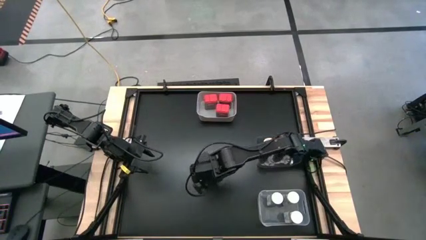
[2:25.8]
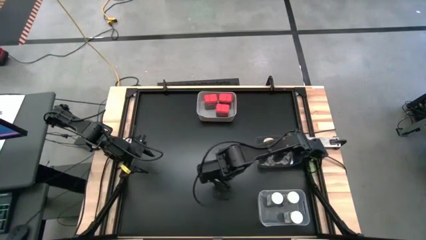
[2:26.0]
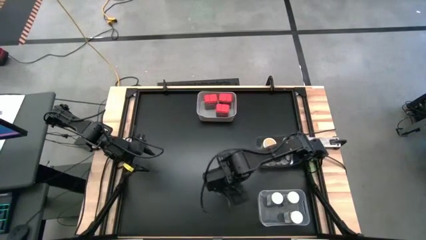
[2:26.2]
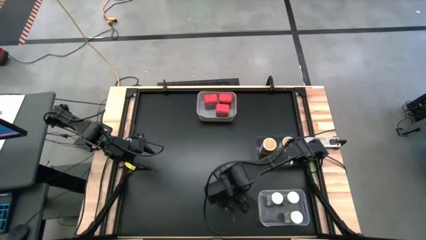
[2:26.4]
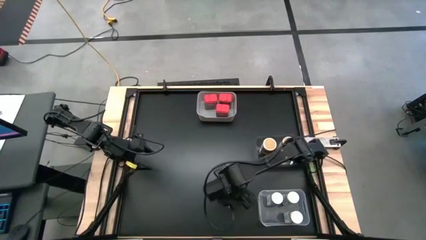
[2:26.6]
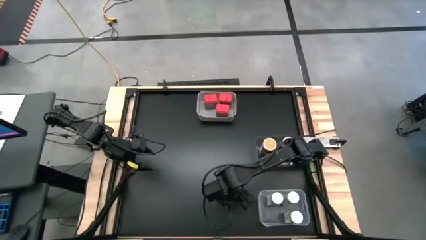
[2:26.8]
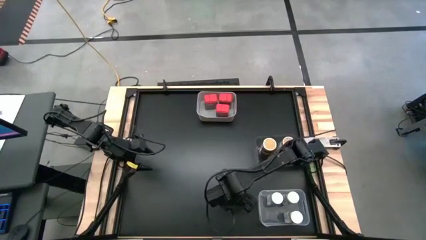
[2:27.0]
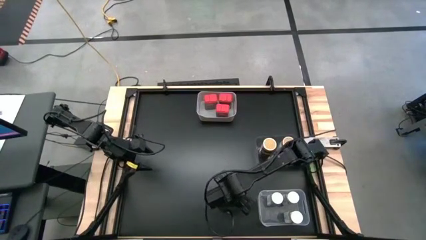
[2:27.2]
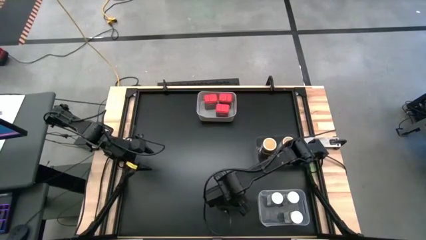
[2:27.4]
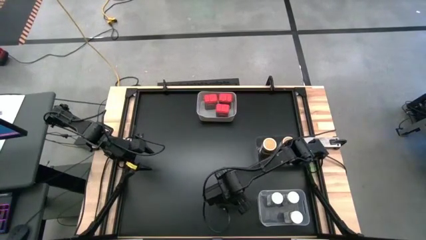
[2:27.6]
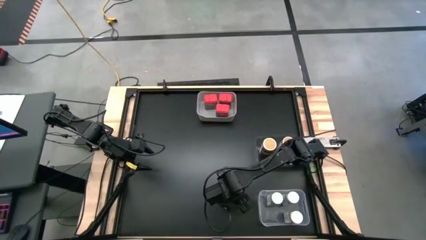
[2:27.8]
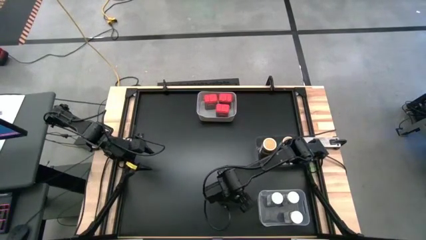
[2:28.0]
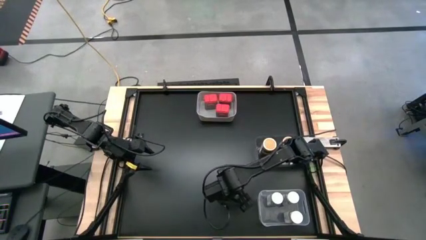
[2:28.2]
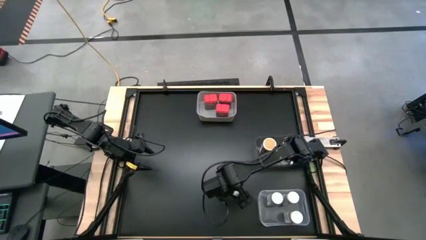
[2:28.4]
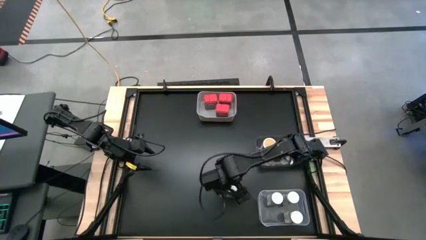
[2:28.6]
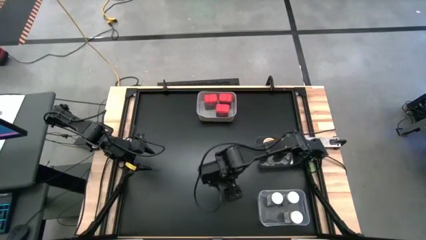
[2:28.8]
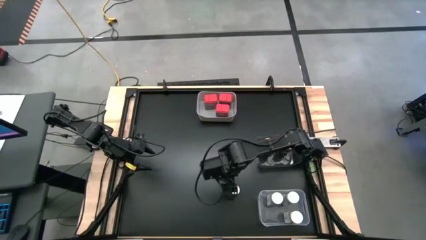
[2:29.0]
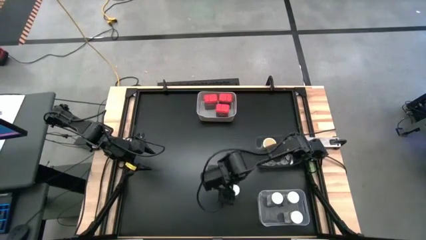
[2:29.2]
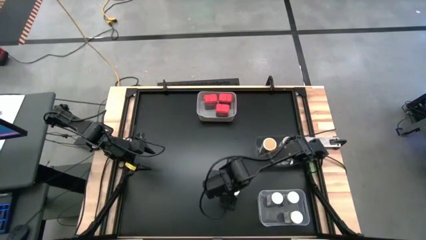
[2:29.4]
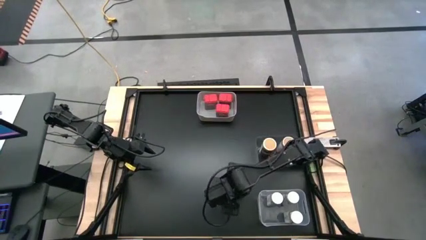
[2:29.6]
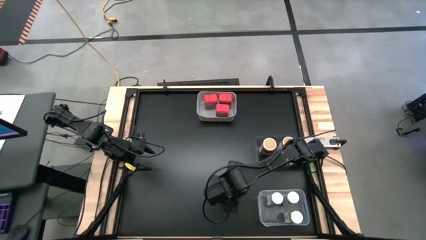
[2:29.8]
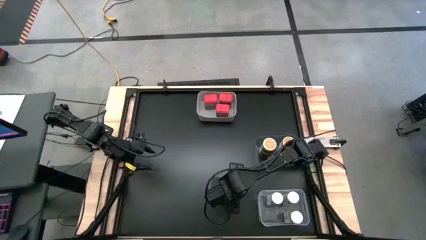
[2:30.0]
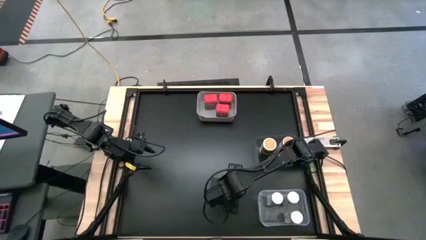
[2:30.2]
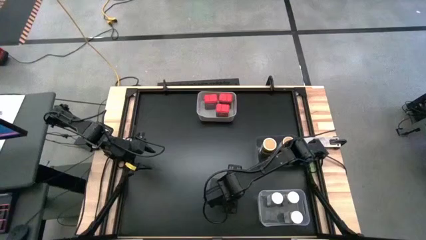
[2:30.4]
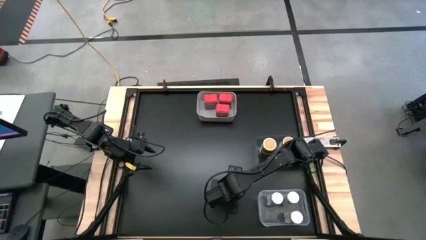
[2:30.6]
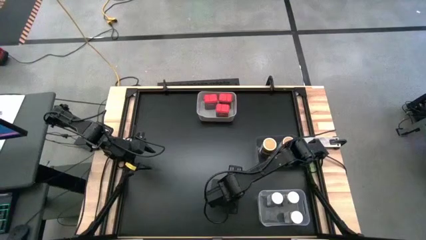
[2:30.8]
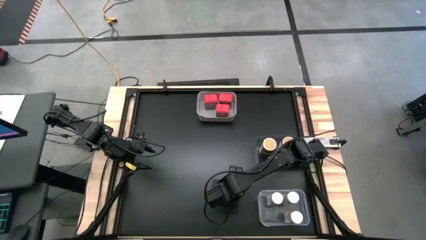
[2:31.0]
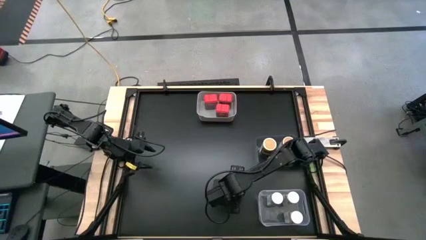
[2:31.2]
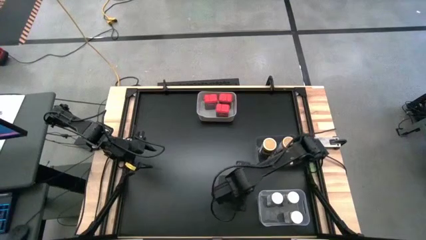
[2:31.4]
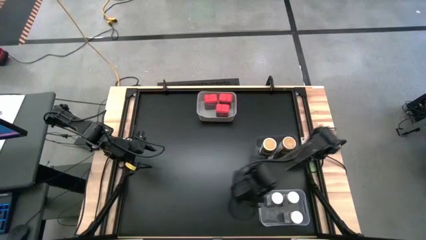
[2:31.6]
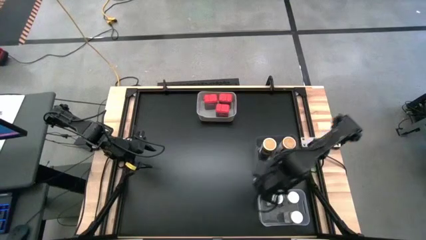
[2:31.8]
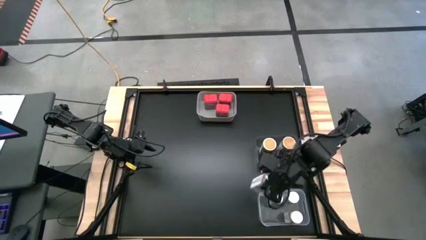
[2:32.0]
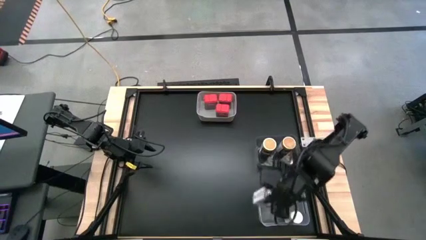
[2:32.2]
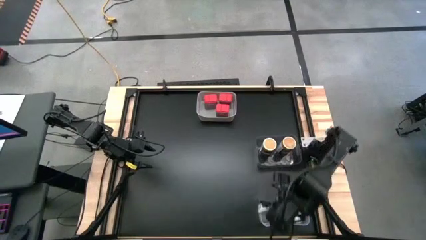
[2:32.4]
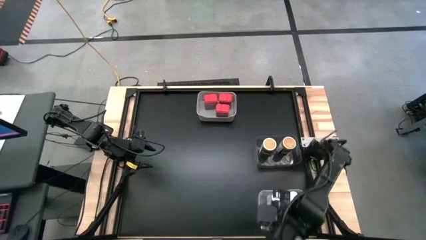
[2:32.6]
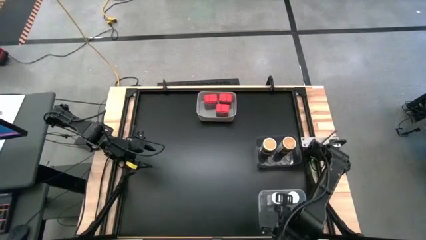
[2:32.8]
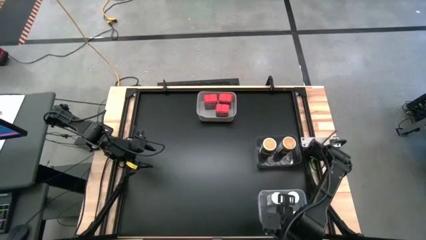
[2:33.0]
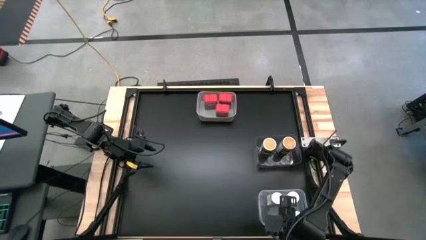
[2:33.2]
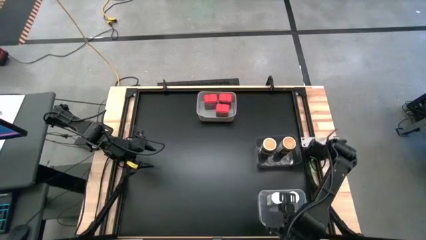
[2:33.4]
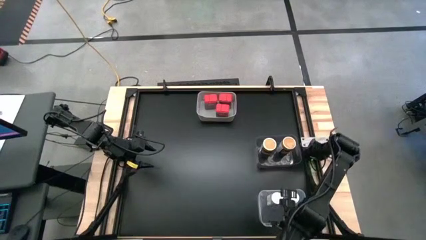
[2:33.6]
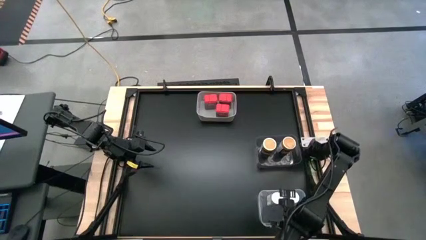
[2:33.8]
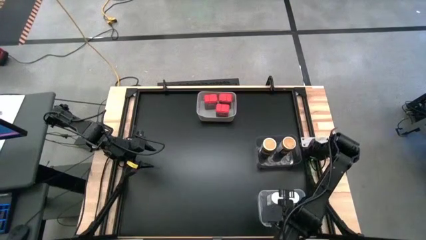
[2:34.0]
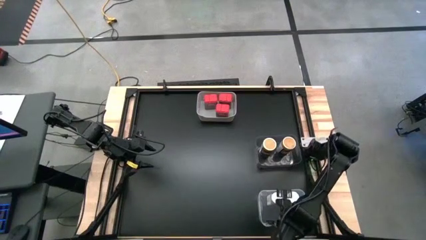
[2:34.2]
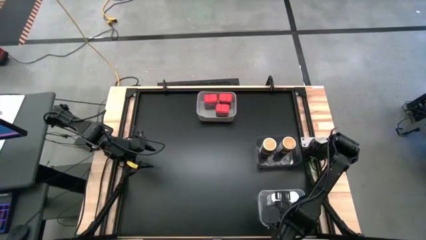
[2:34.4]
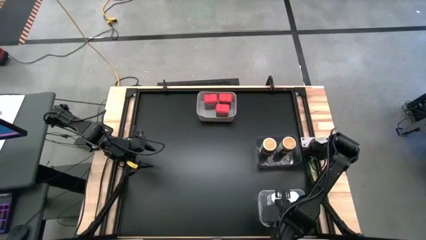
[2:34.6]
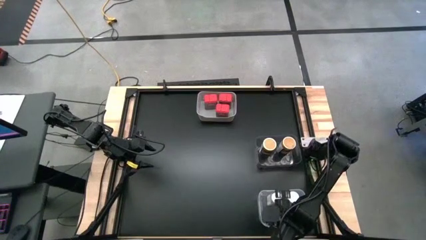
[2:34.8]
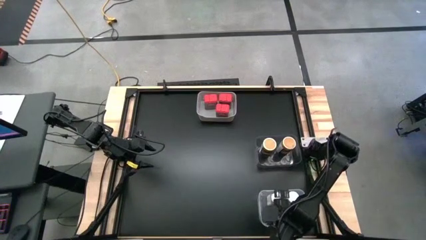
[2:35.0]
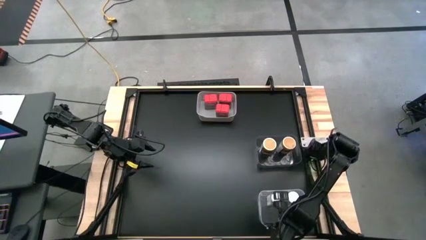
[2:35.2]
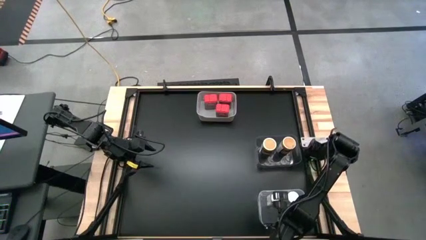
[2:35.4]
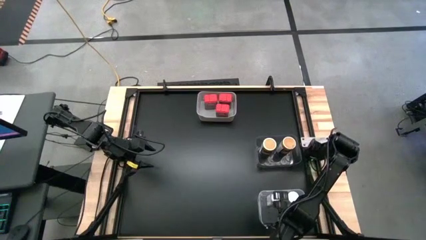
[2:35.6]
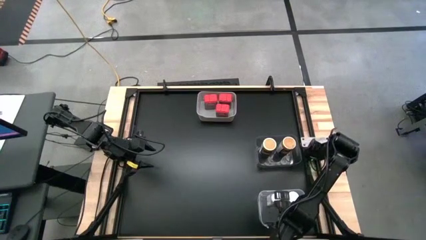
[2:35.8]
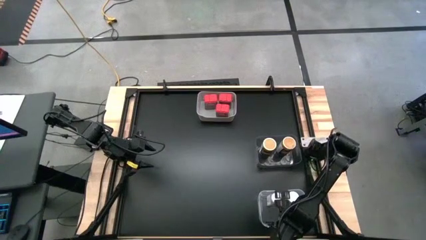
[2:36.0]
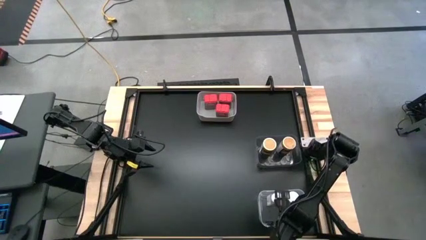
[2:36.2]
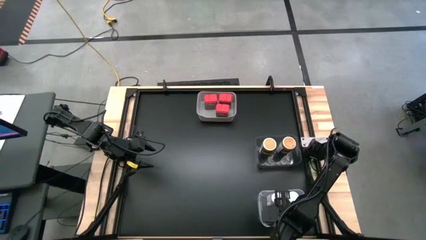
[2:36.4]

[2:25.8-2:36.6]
Task: Sort spices by type
Put the white seasoning bottle into the transparent bin

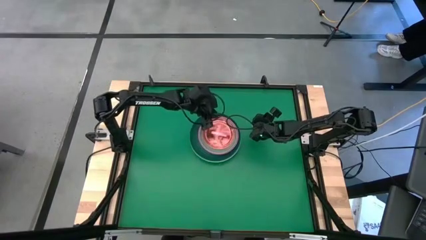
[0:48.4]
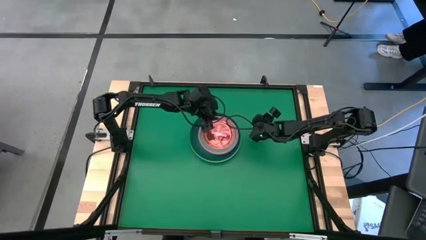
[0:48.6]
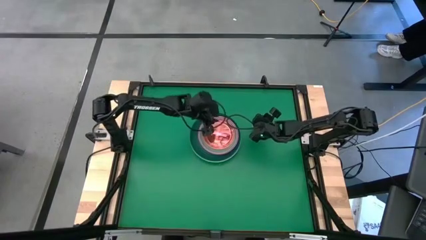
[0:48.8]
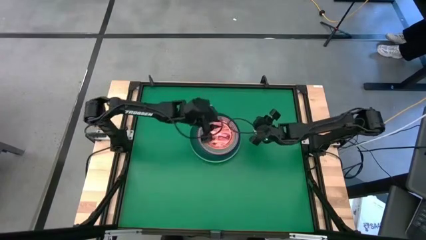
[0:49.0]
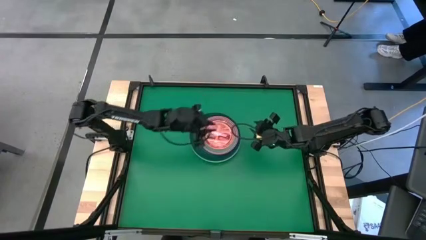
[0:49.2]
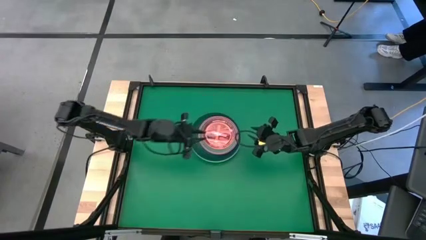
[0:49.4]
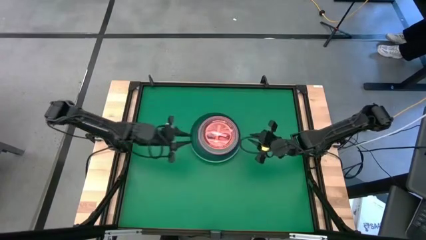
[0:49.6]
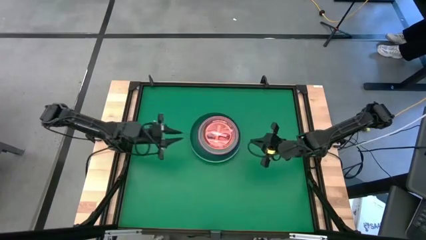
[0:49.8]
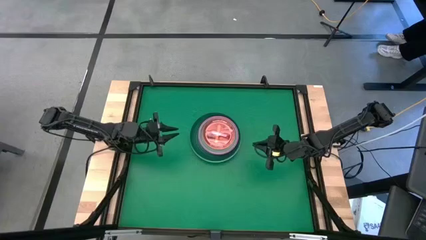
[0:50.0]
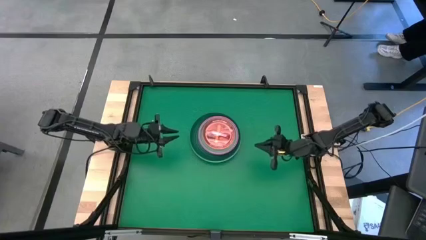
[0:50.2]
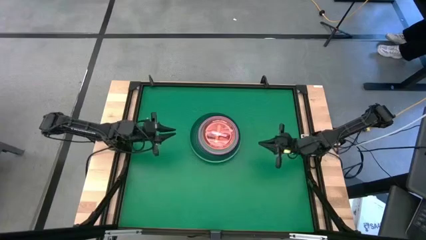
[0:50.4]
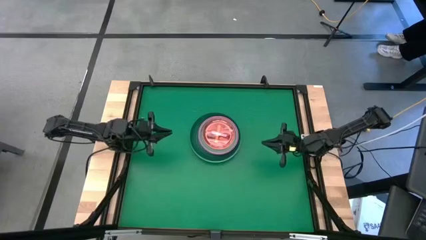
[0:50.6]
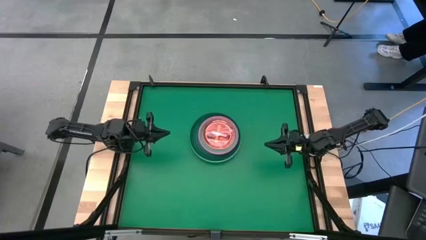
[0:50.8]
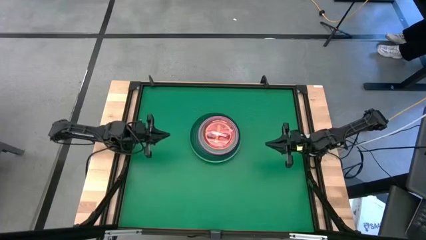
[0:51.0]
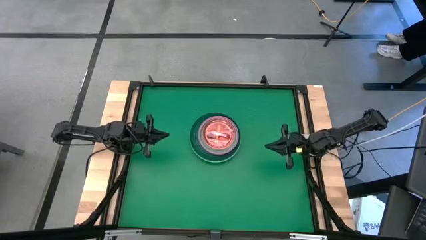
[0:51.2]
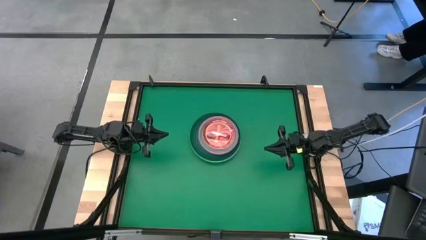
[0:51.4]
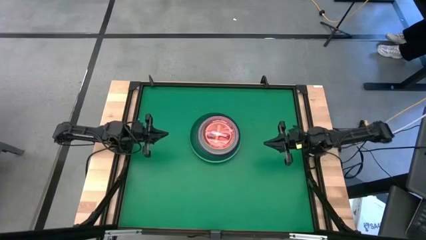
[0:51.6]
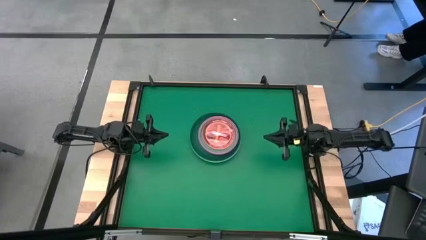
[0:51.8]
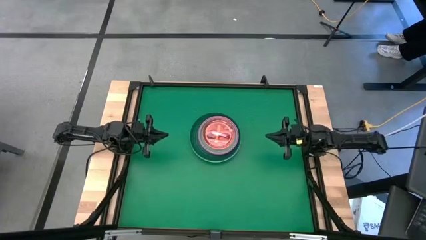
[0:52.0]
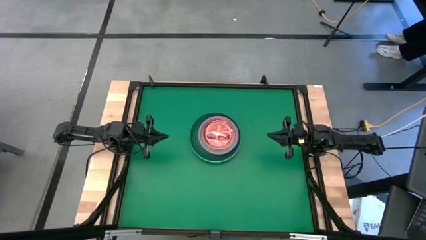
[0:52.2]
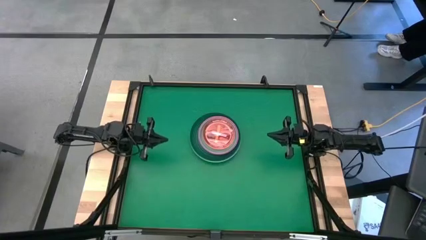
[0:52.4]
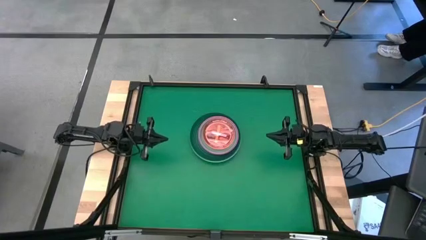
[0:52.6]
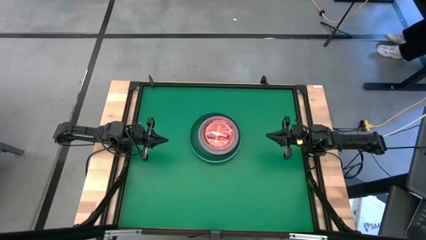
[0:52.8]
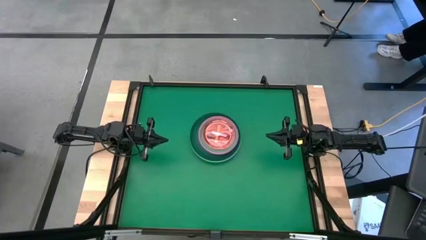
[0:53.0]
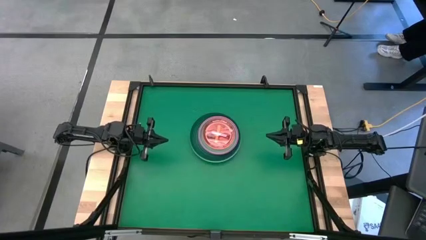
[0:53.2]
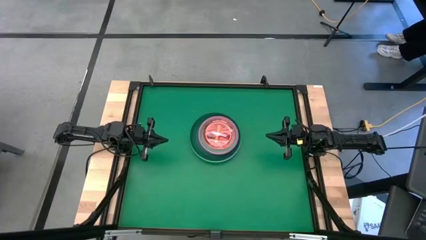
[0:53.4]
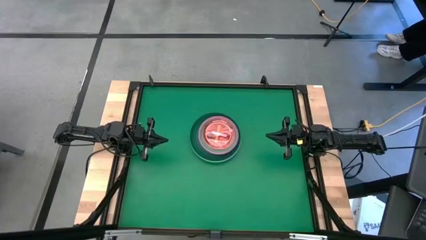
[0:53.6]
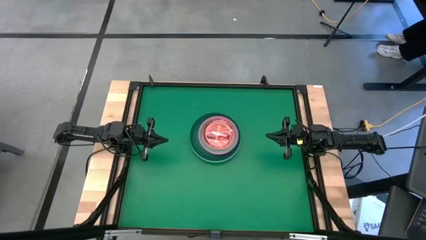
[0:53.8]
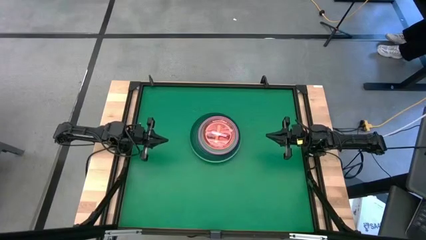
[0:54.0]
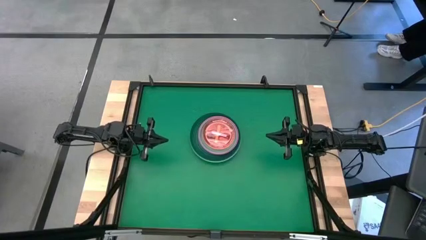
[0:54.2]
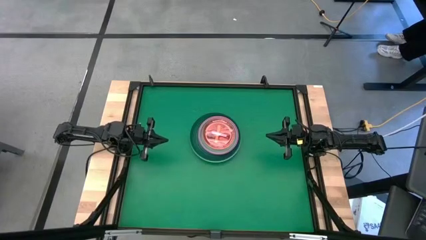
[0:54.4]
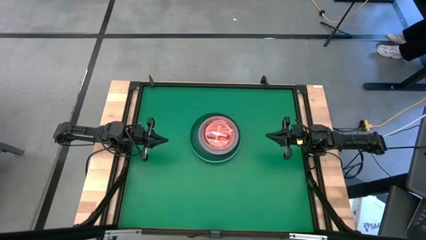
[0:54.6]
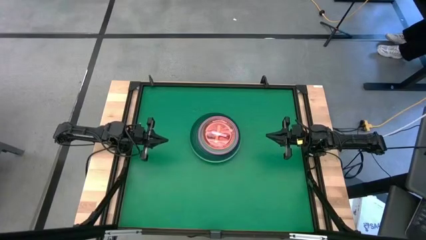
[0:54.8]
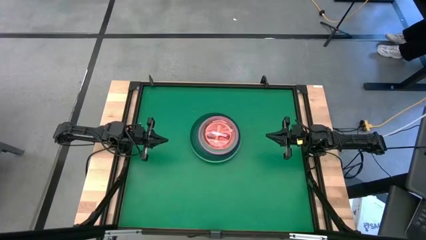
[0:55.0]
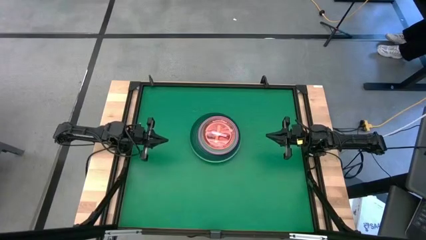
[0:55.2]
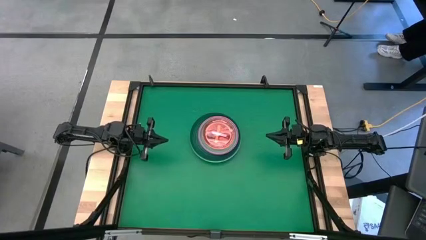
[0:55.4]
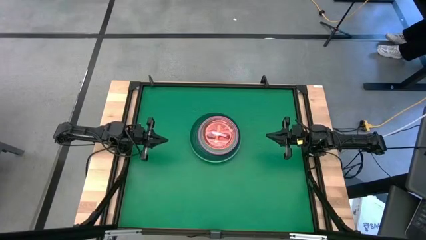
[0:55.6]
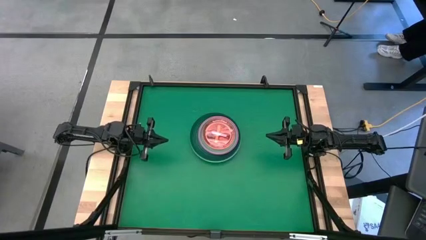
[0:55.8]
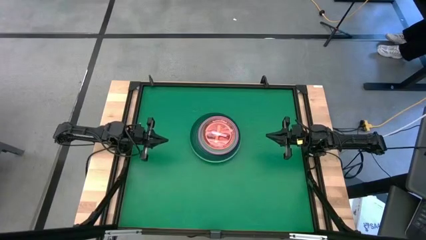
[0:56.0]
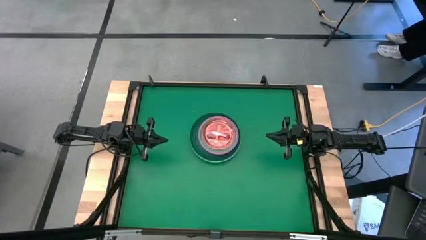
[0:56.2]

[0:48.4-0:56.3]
Task: Stack plastic plates
Return to Home Position
